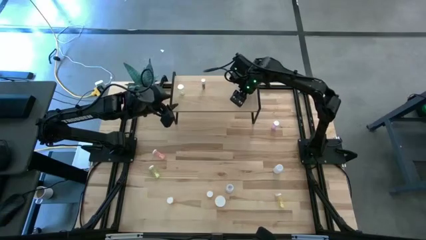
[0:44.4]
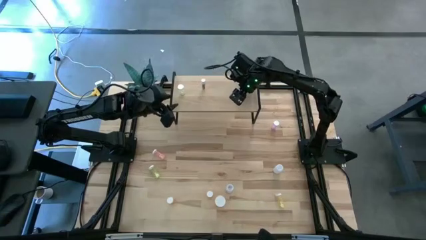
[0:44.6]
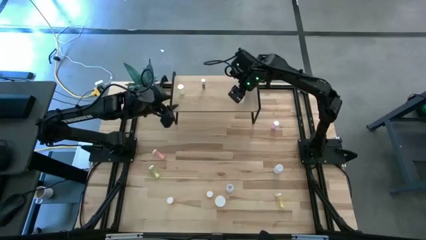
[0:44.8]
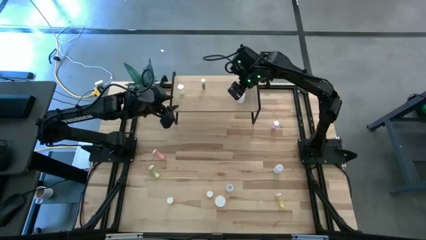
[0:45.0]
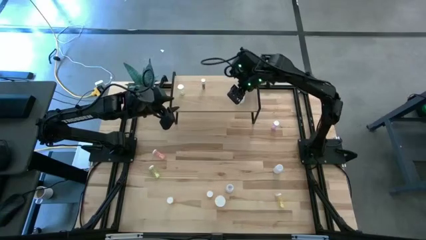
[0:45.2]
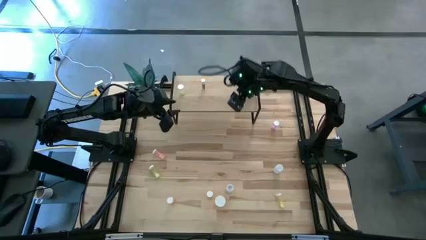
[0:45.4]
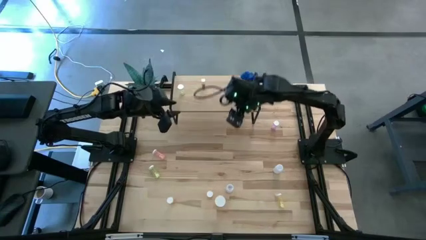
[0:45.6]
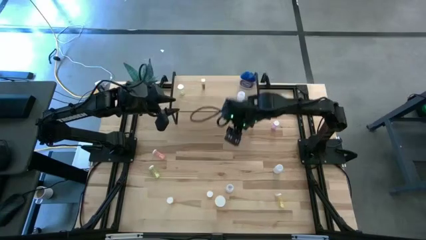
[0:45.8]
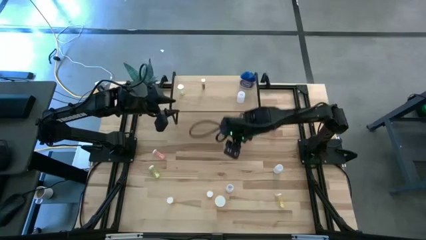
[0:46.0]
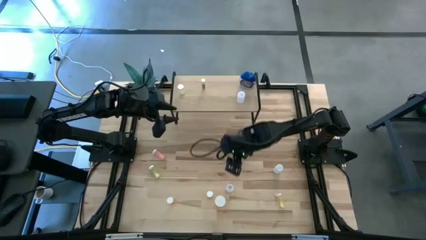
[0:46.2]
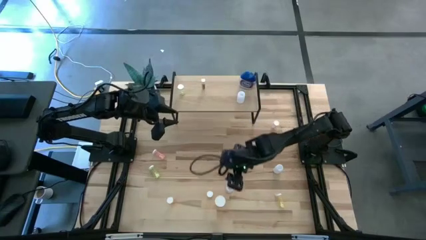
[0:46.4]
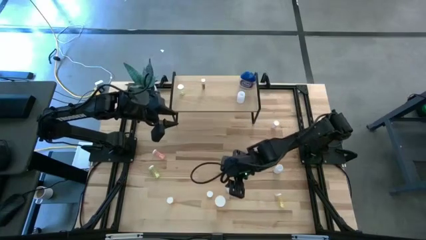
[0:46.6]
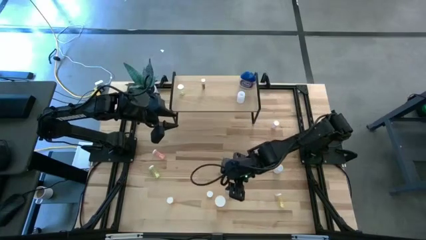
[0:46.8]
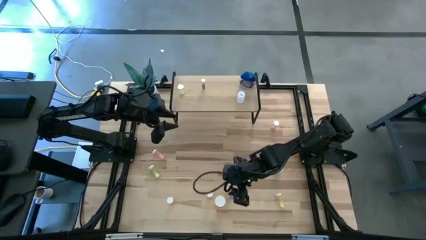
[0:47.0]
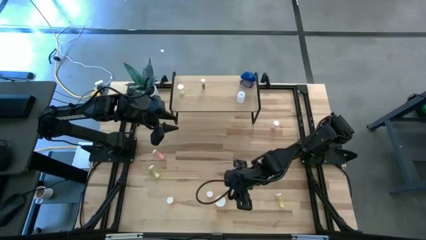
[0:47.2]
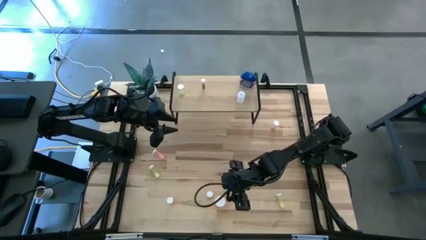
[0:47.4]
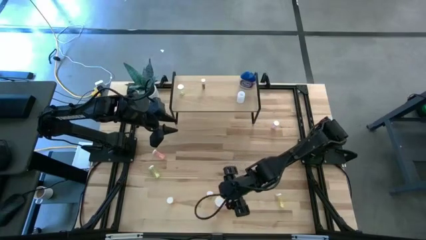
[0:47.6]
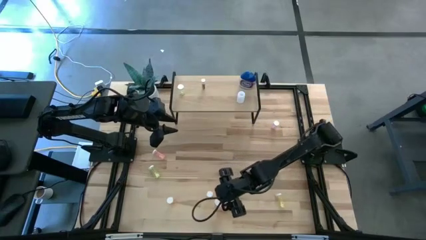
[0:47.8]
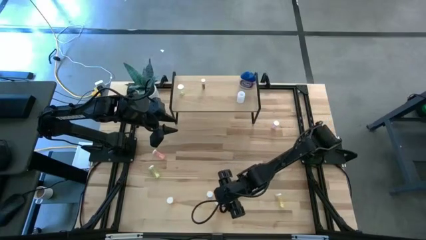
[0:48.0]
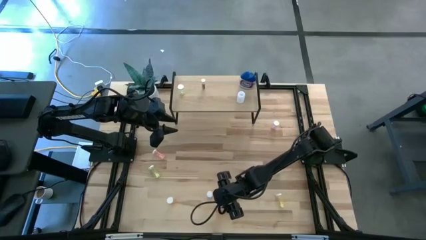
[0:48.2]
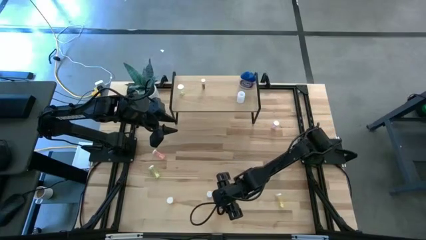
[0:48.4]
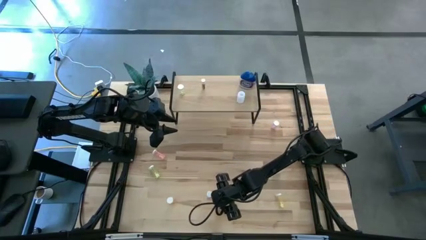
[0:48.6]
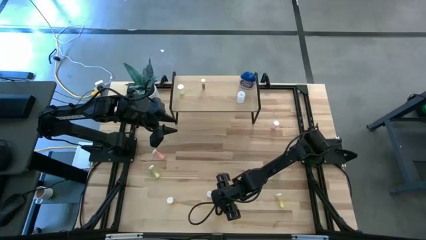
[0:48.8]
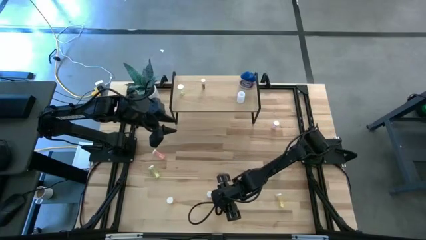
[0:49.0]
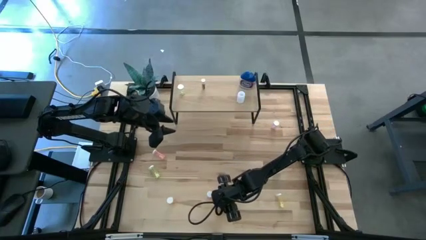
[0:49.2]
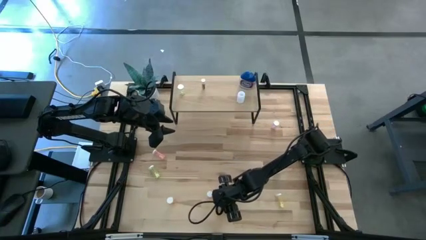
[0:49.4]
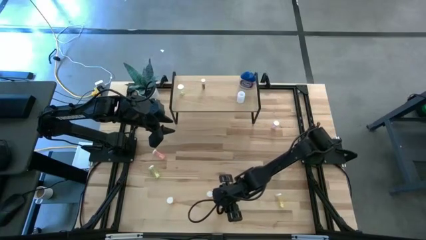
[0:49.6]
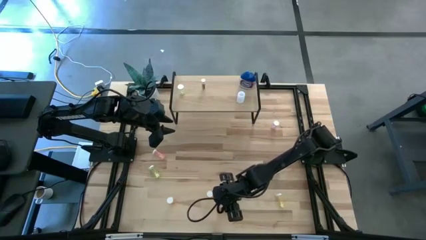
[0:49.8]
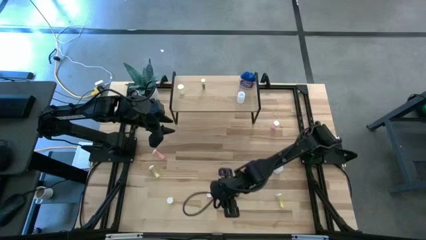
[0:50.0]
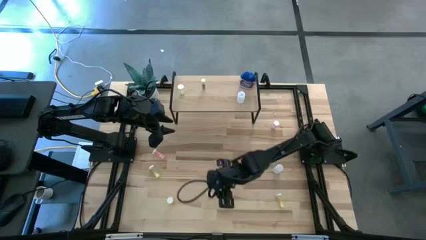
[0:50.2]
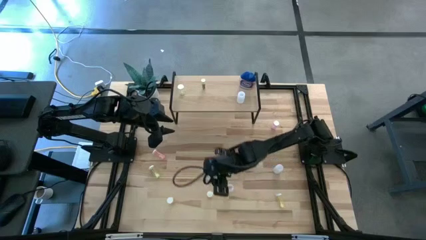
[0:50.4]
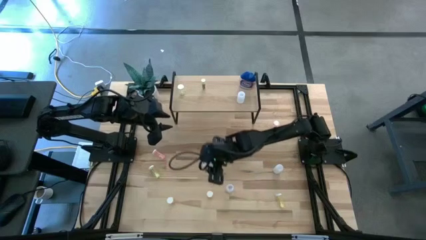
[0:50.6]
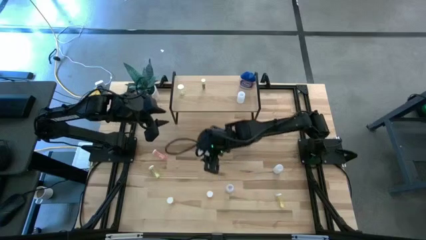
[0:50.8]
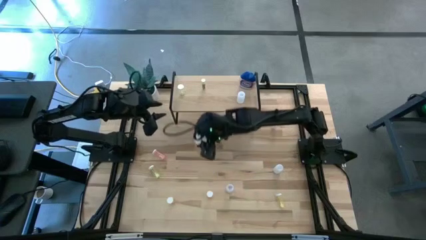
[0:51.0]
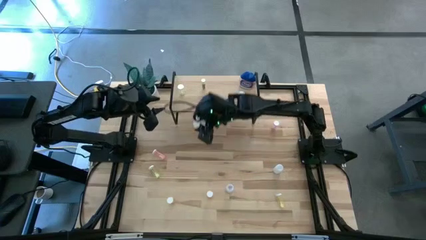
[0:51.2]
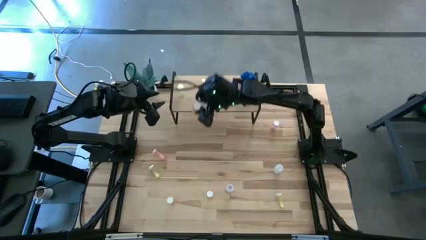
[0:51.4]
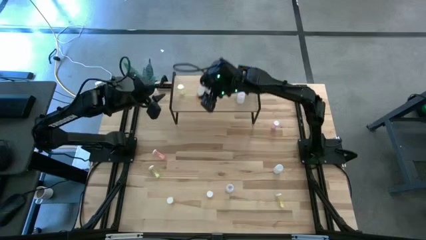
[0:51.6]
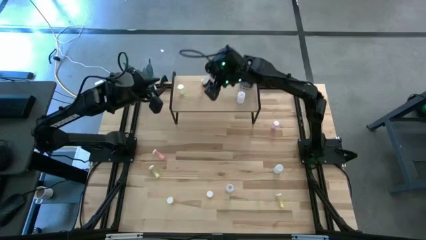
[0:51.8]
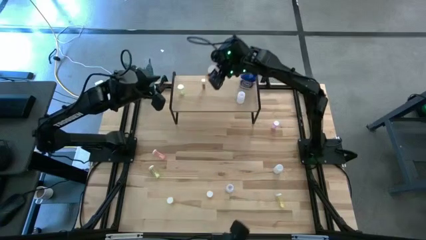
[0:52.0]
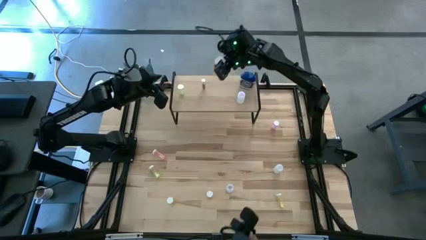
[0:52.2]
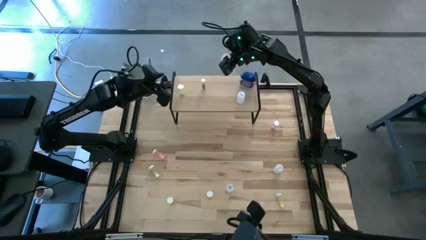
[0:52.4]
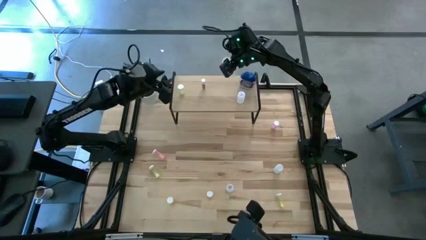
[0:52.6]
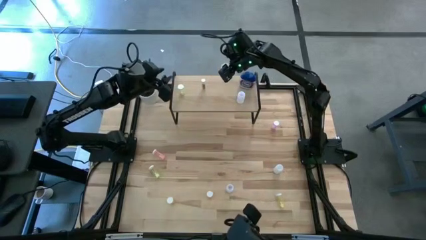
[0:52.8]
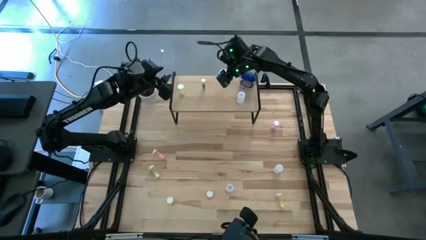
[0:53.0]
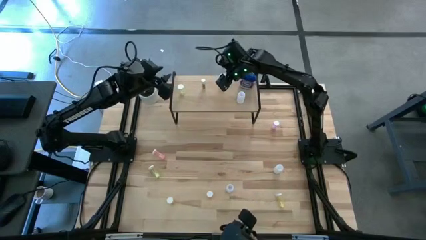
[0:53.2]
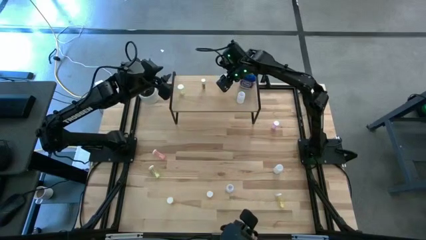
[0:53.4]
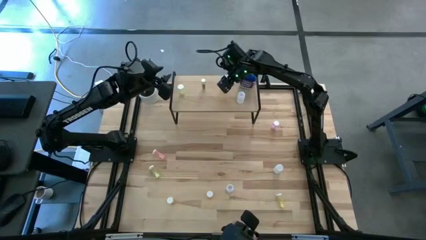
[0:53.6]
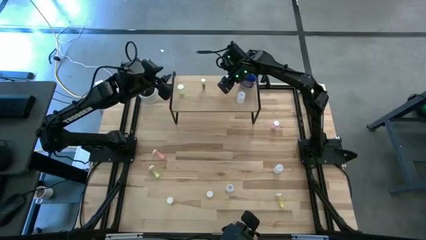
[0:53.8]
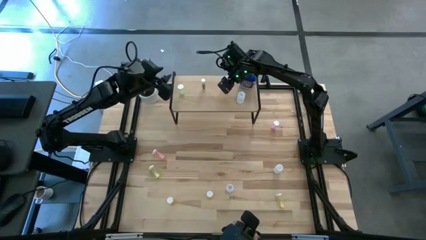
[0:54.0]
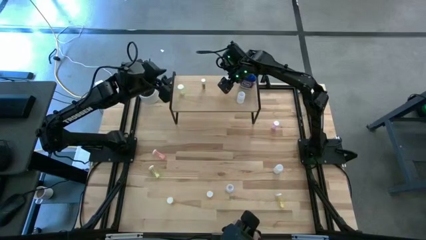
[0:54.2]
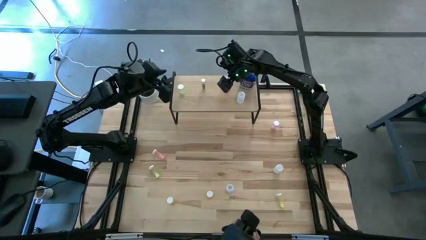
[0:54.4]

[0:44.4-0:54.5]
Task: Pick and place medicine bottles onto shelf by color
Put the large orange pill bottle on the shelf

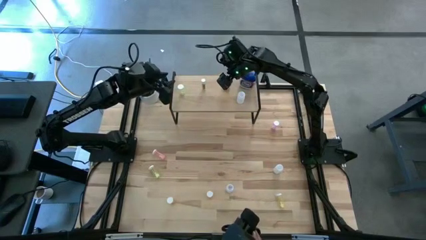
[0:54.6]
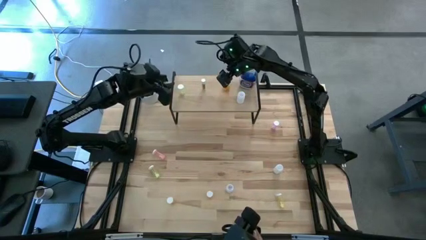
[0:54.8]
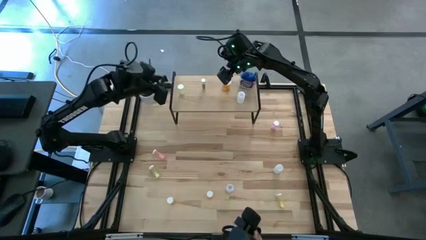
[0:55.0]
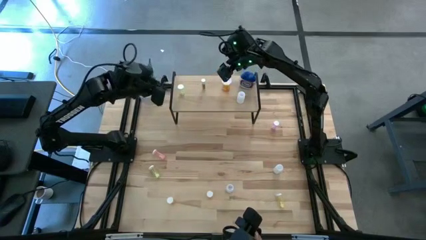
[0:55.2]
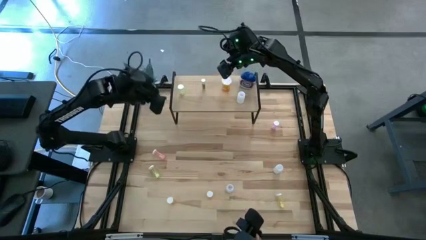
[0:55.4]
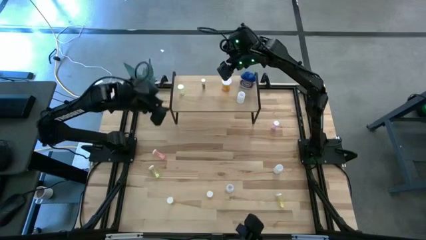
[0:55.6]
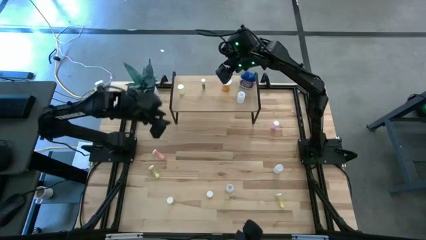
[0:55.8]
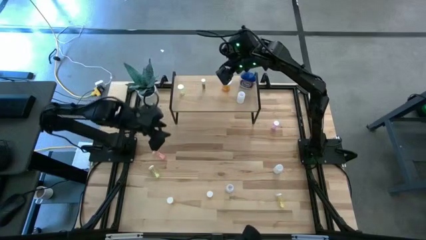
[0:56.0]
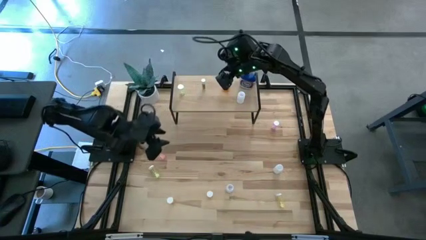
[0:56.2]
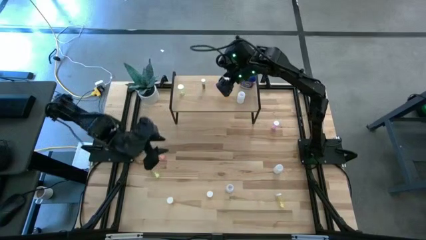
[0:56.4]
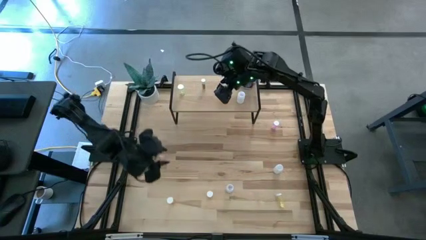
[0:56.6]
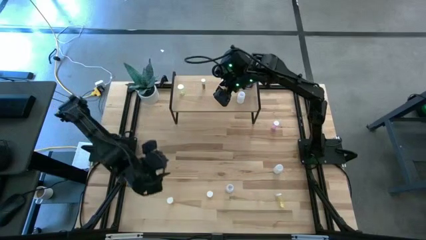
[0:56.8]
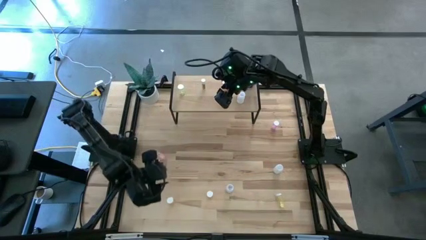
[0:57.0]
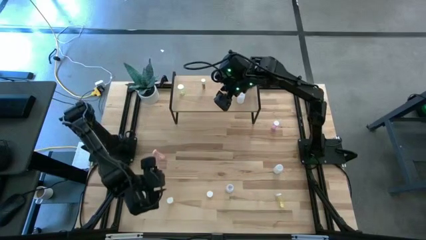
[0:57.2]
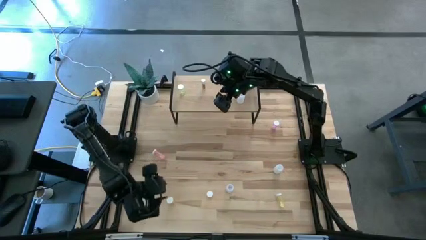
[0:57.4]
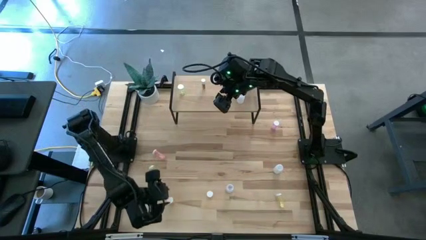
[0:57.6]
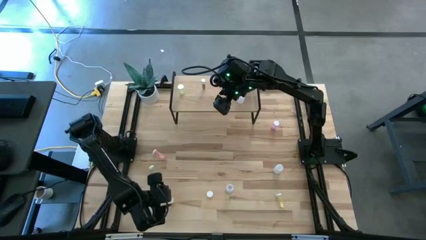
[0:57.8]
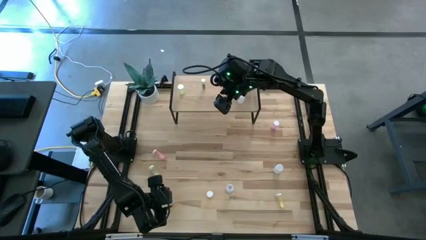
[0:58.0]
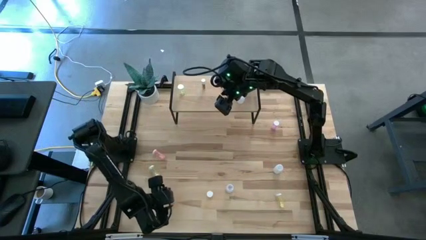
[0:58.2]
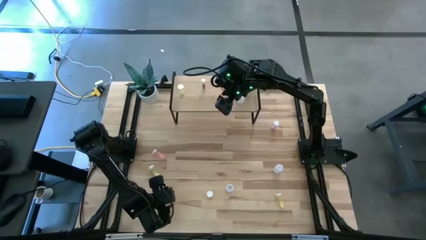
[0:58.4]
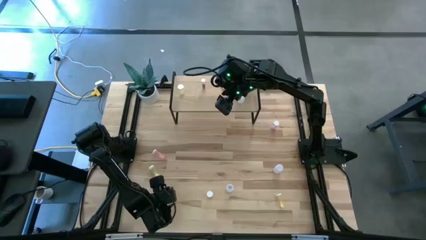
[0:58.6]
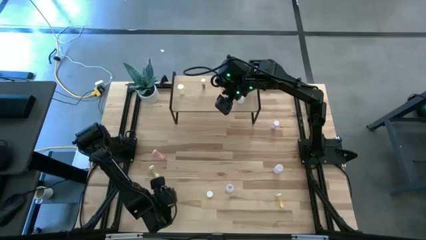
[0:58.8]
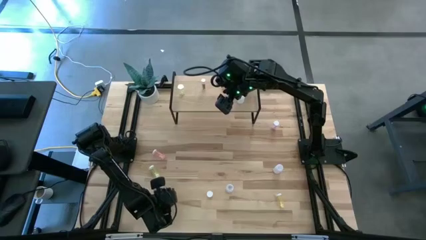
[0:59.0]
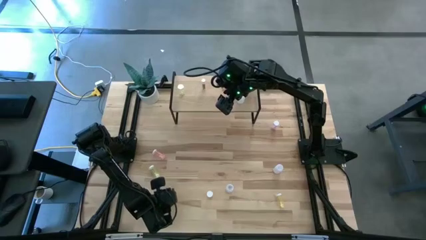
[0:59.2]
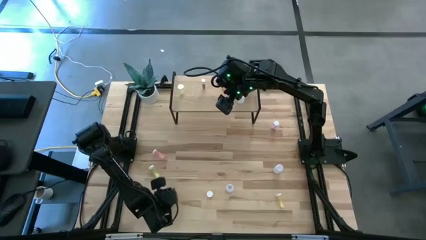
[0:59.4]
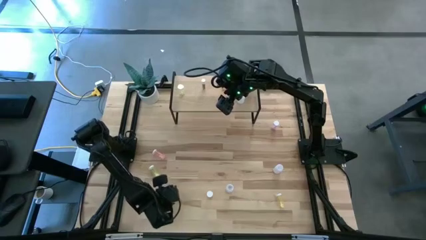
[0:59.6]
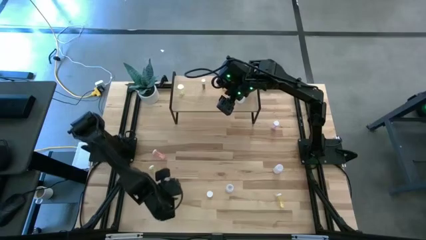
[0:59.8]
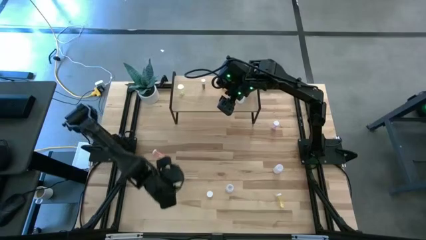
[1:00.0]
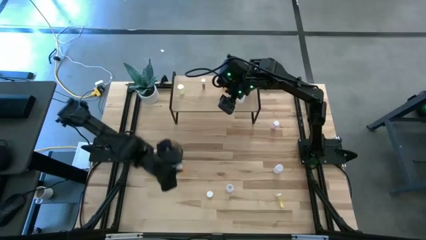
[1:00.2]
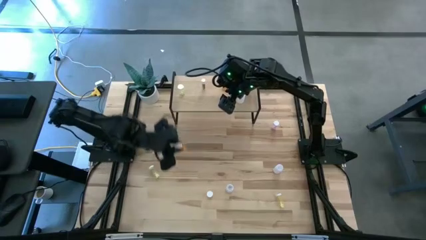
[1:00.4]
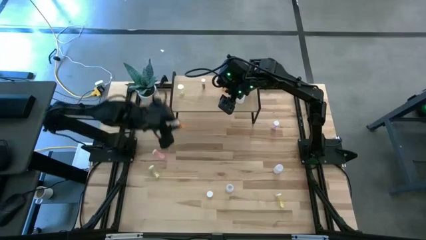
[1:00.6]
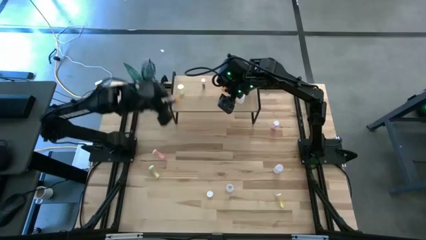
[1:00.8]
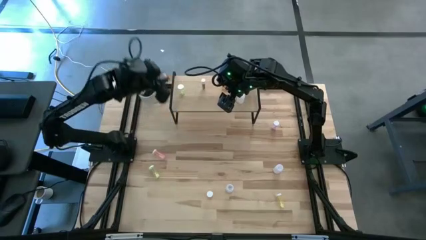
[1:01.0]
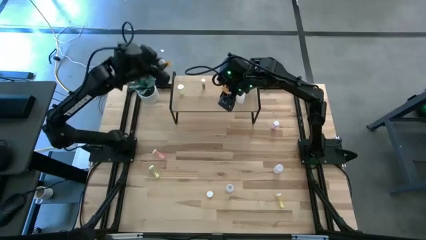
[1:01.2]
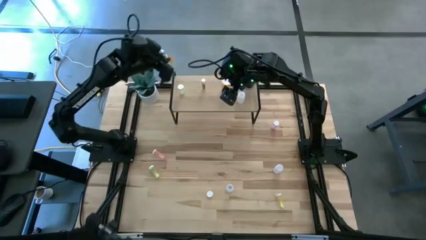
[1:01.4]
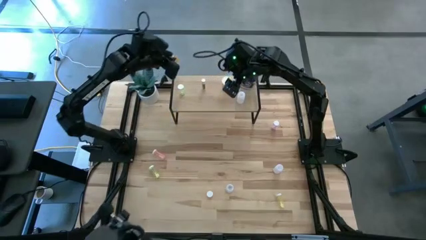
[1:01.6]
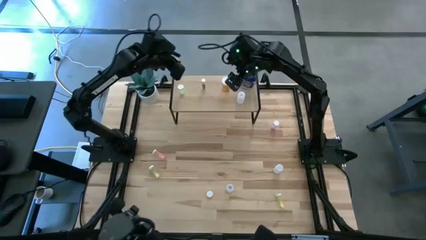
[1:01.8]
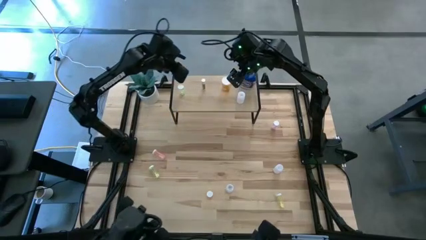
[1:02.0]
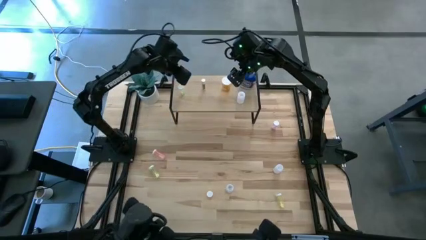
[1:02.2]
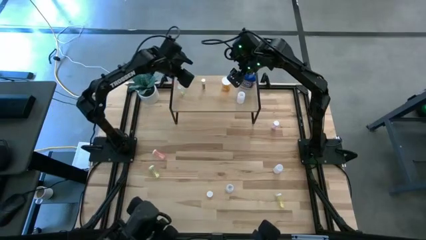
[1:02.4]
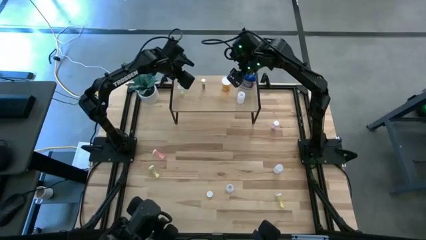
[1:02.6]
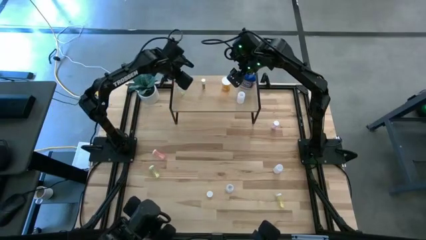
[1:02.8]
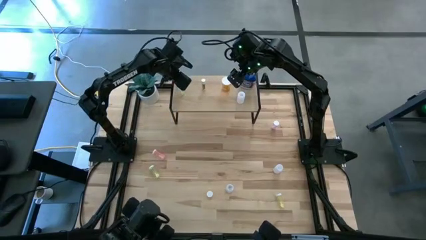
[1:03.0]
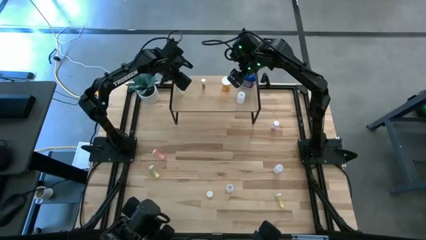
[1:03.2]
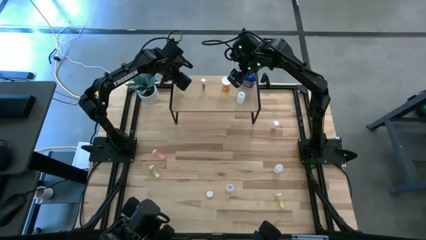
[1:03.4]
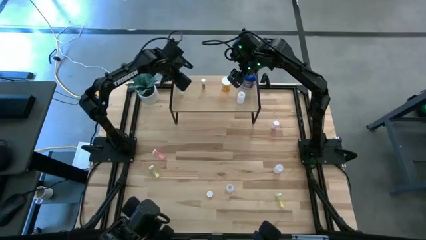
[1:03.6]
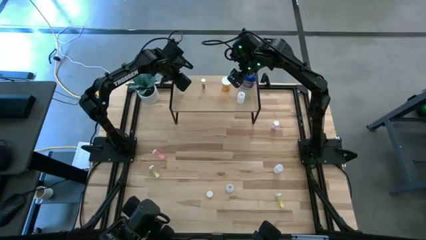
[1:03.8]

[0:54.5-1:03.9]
Put the left small orange pill bottle on the shelf
